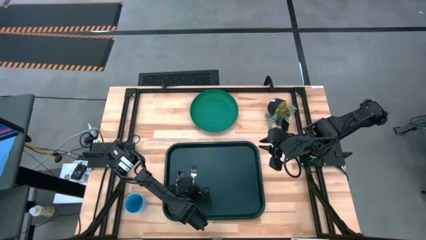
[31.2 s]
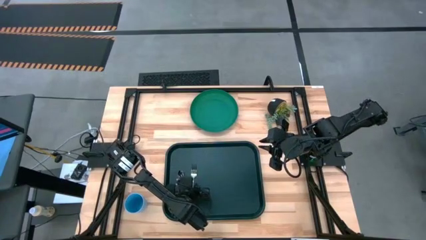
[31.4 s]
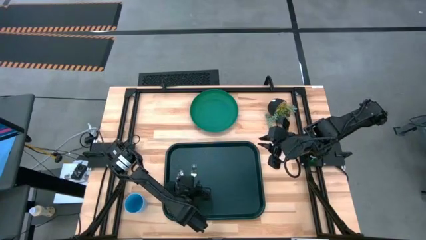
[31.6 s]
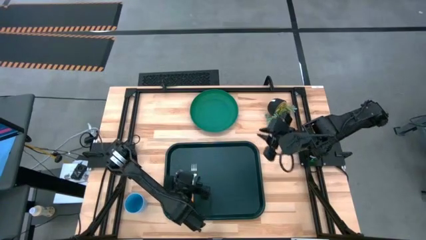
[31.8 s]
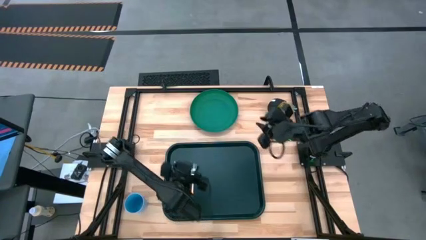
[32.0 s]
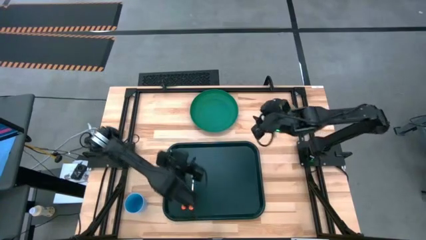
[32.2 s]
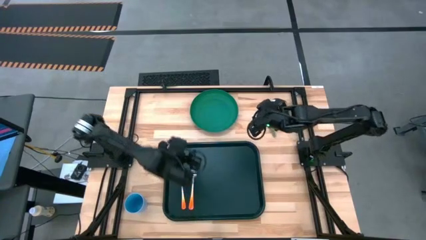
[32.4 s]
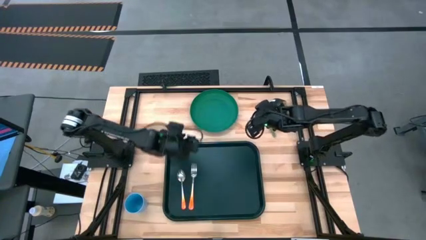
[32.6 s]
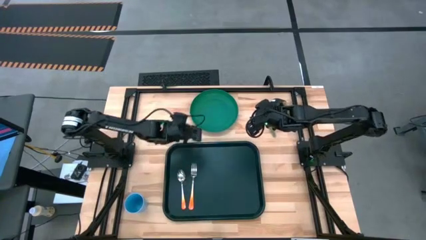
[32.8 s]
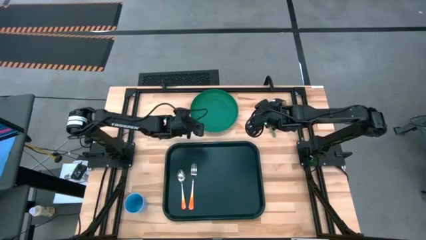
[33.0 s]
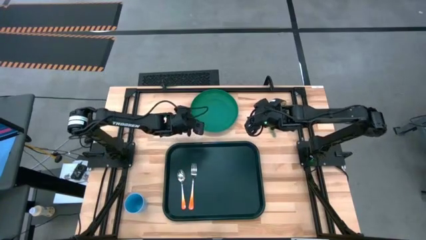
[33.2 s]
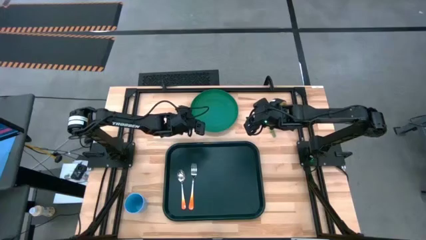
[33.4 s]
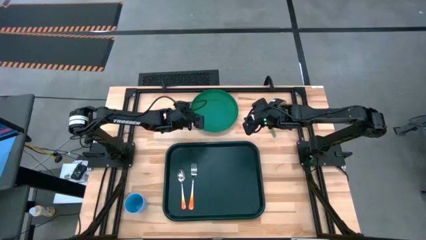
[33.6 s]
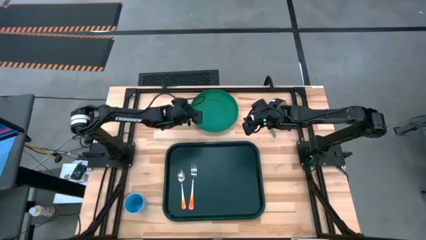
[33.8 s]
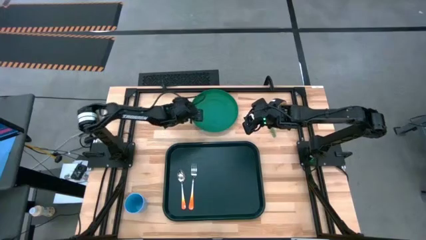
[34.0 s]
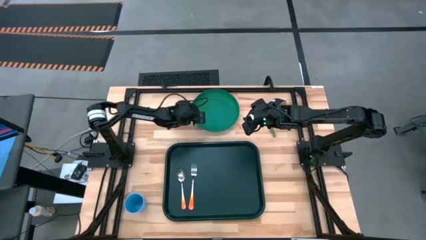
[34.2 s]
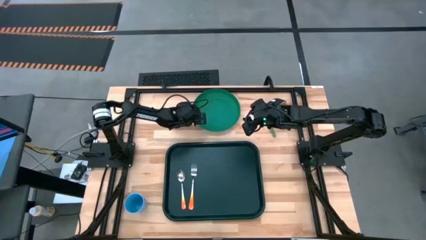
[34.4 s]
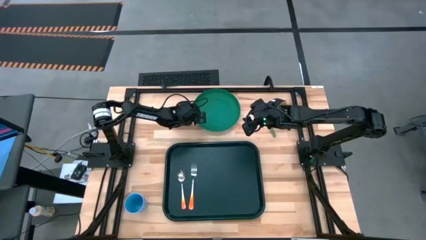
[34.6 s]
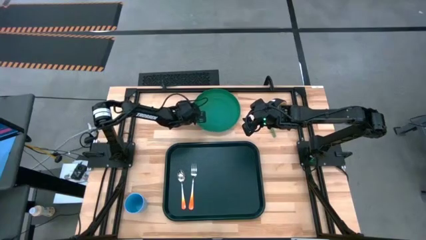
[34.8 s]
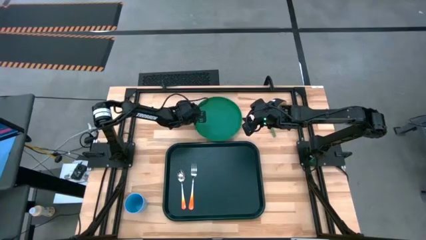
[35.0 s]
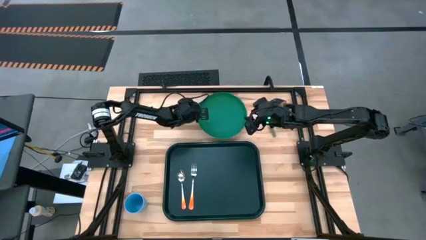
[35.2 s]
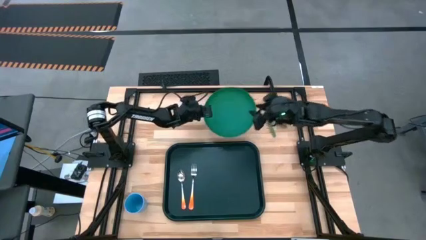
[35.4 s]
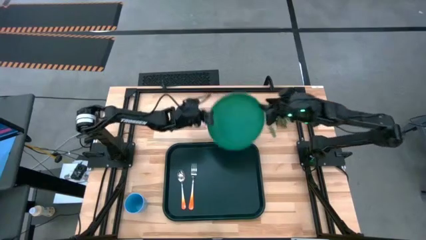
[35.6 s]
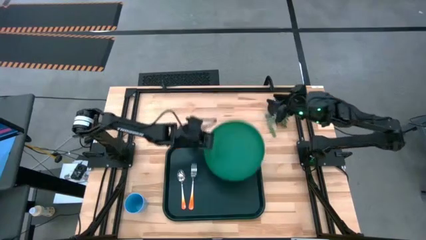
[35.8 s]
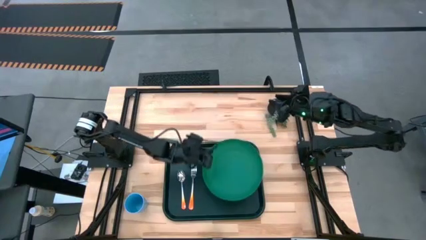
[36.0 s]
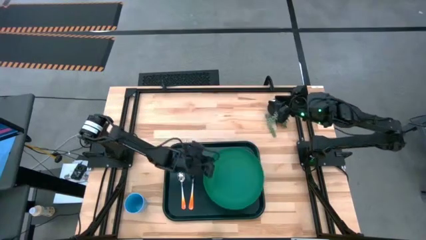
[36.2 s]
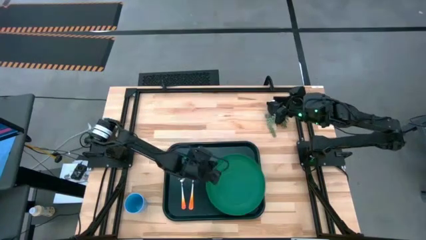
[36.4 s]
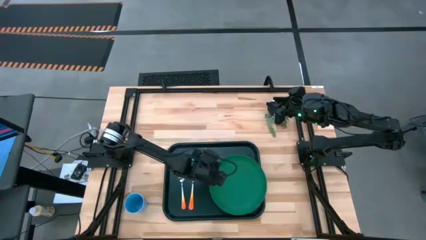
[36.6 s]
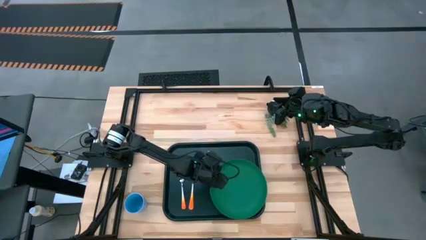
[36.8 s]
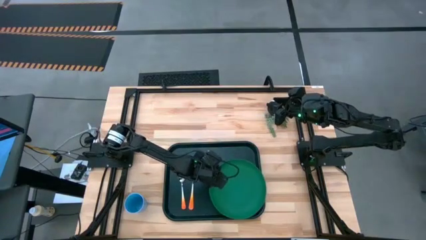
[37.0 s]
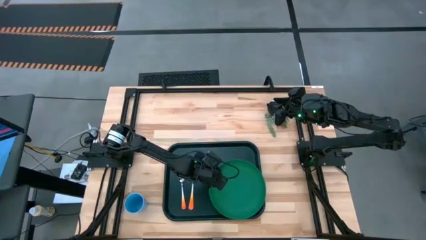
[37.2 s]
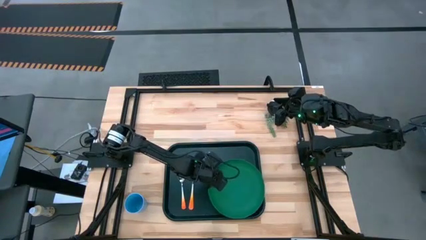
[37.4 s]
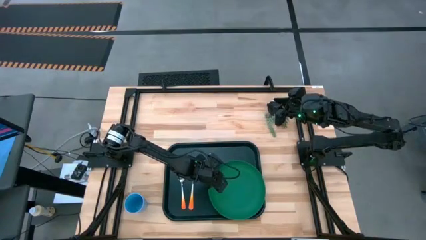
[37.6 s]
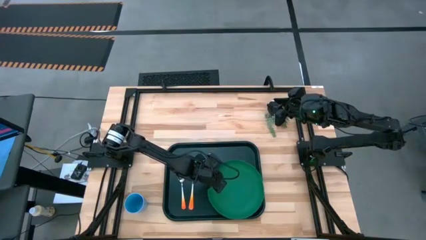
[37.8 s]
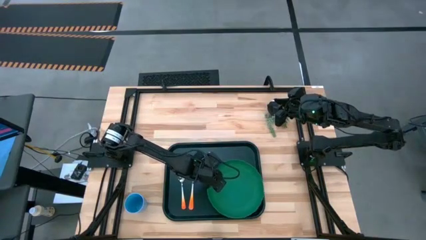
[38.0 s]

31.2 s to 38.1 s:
Task: Pick and place plate/cup/fork/spoon on tray
Put the green plate on the right of the black tray beside the orange fork

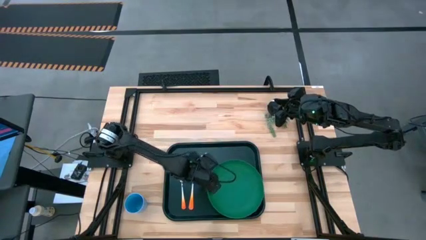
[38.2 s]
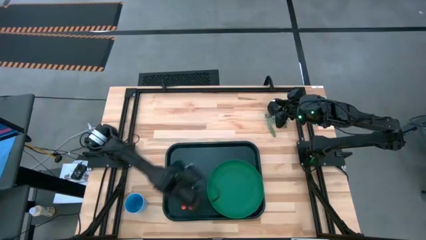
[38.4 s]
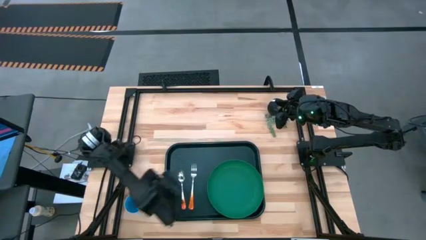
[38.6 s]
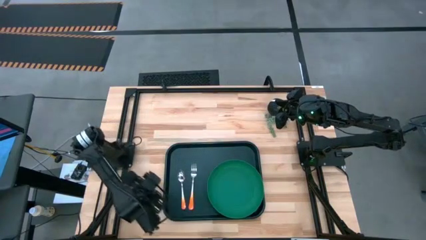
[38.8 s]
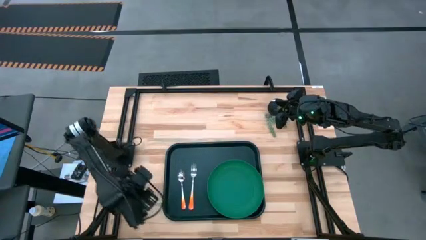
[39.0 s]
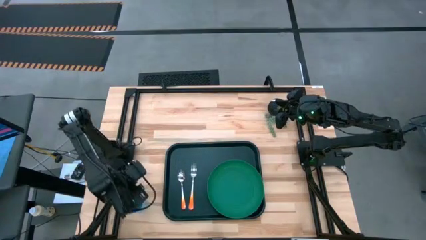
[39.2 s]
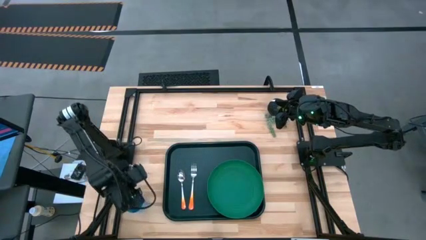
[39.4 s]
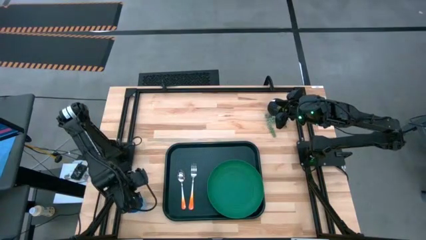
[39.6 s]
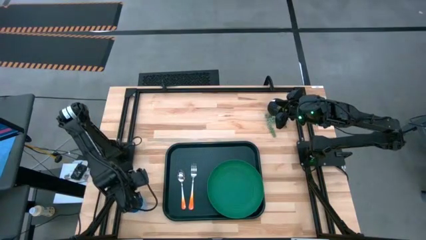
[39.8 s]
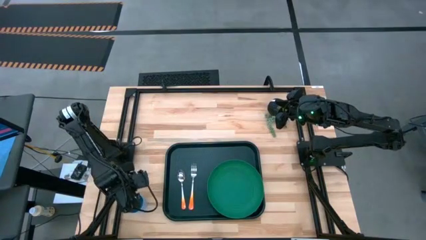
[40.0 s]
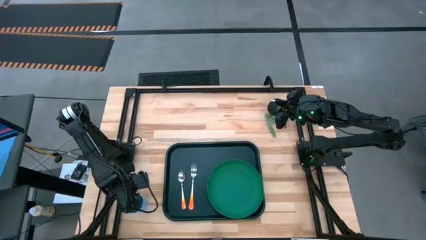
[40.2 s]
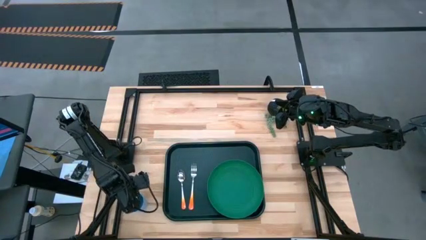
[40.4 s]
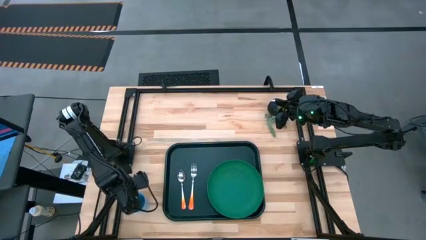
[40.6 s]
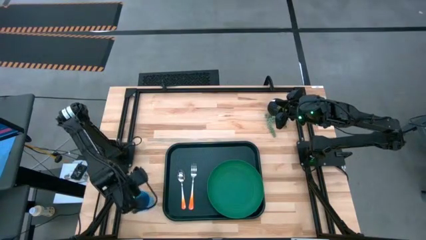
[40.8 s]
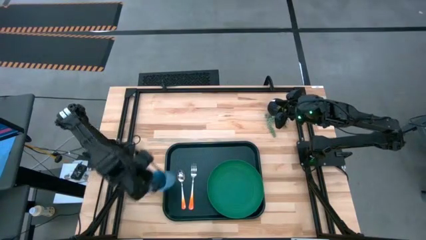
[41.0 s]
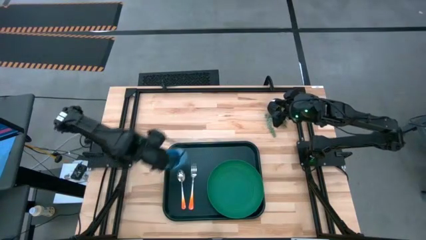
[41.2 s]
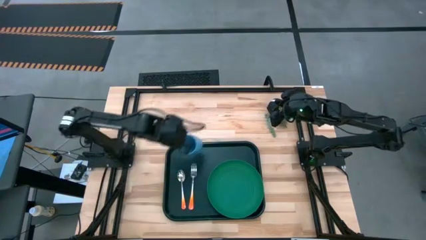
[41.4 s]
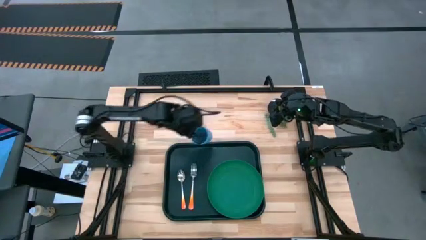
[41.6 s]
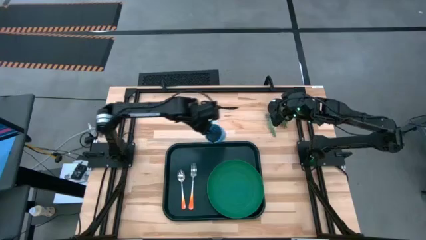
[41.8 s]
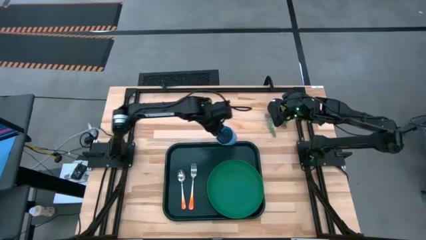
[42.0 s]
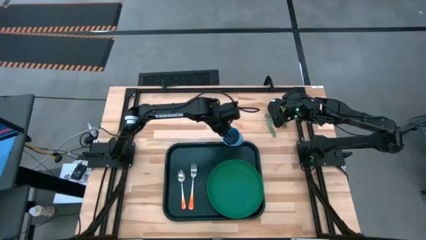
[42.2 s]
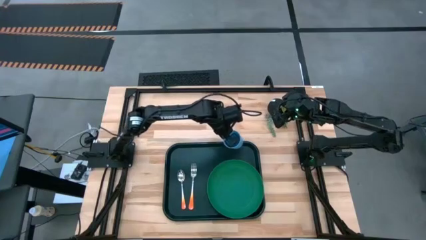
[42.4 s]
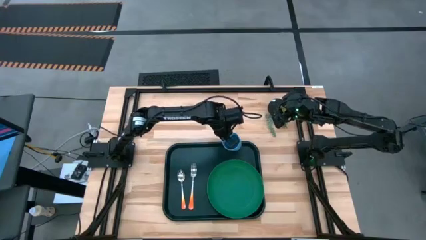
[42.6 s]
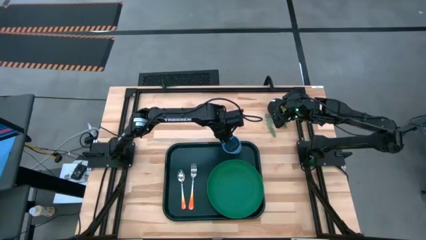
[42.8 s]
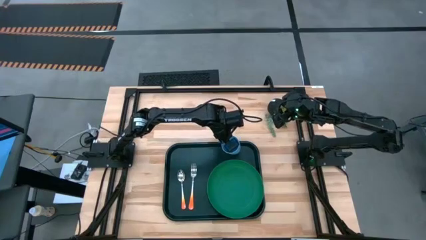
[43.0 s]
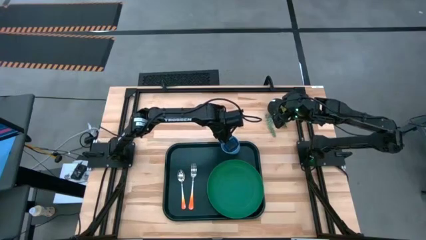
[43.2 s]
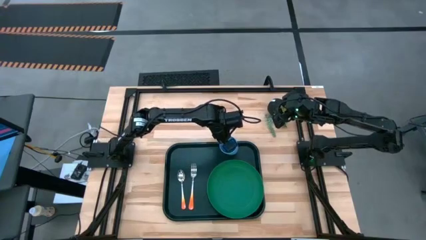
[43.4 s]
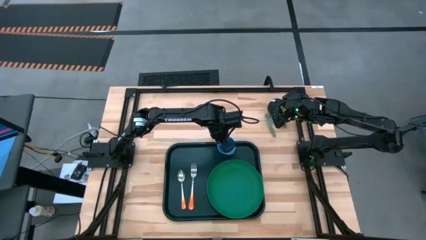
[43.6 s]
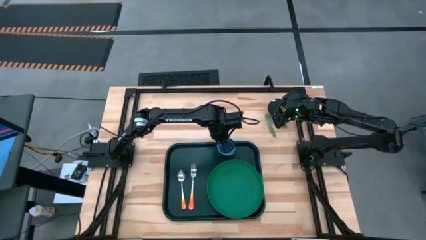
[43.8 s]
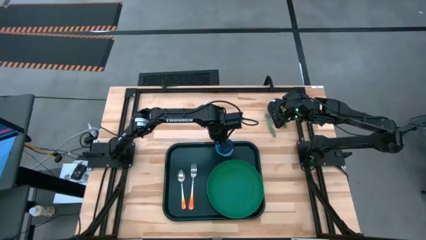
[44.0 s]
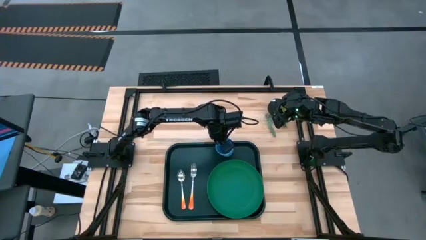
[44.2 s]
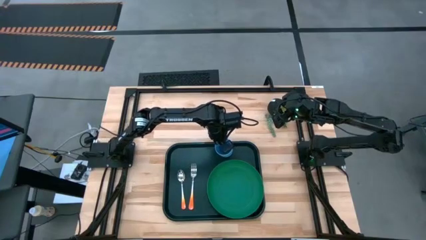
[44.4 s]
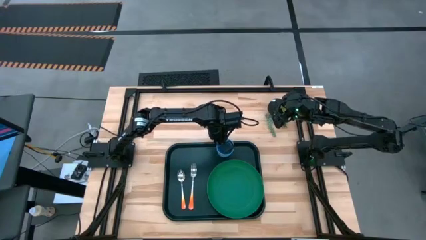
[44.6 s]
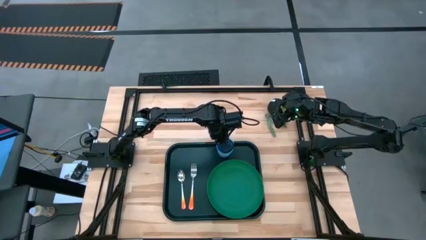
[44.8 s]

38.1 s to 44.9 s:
Put the blue cup on the black tray on top of the green plate

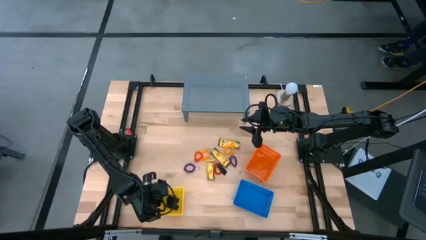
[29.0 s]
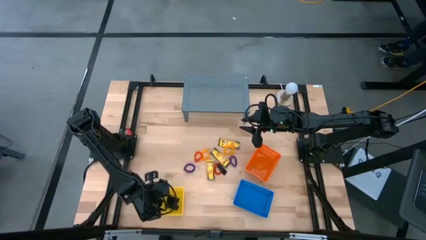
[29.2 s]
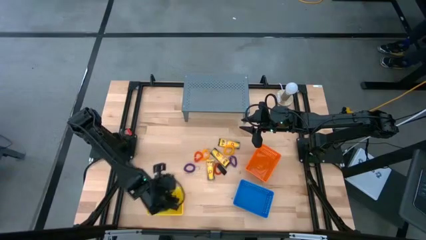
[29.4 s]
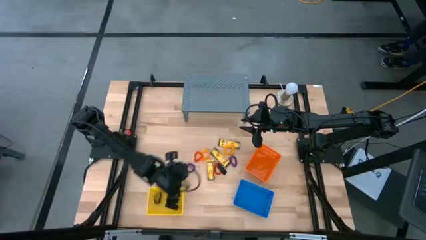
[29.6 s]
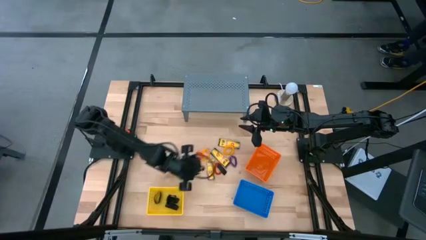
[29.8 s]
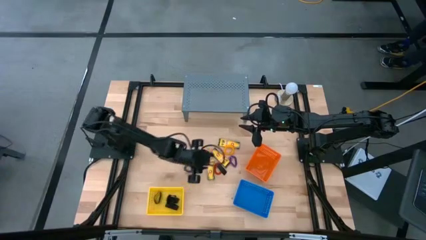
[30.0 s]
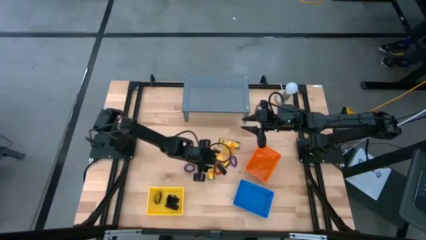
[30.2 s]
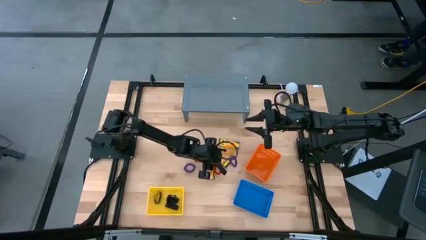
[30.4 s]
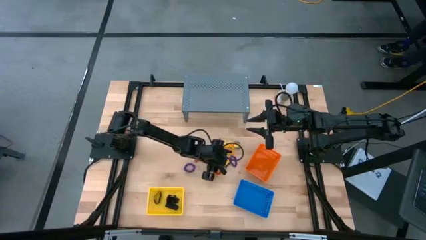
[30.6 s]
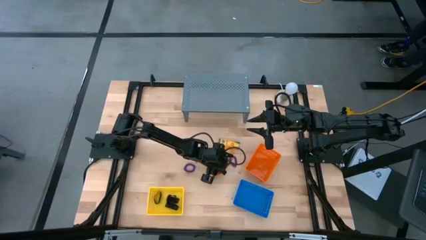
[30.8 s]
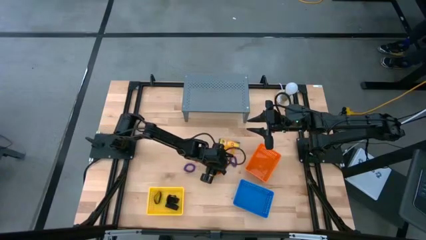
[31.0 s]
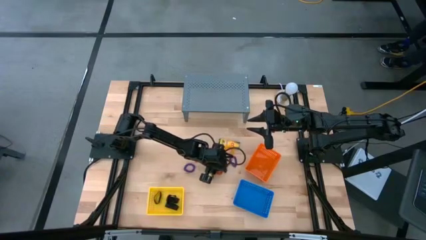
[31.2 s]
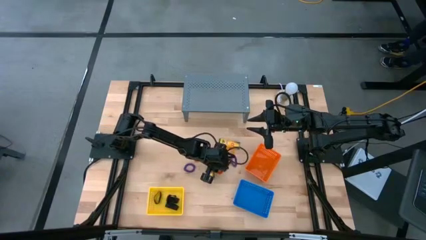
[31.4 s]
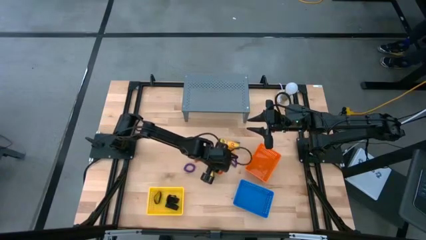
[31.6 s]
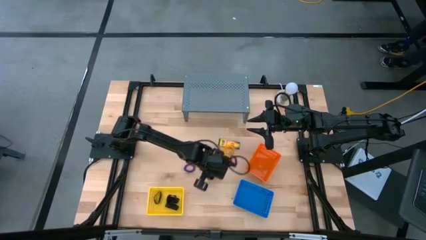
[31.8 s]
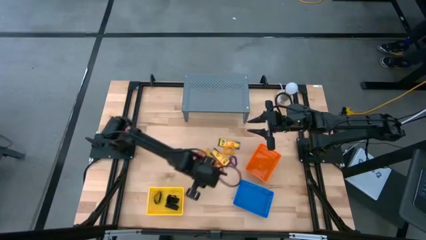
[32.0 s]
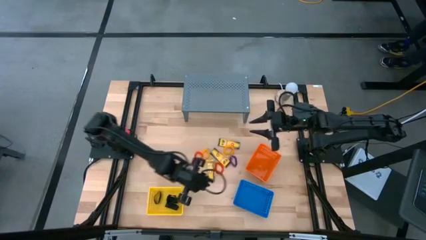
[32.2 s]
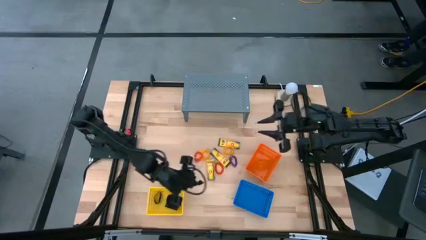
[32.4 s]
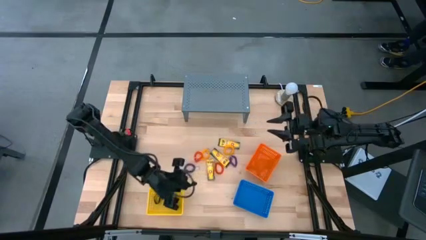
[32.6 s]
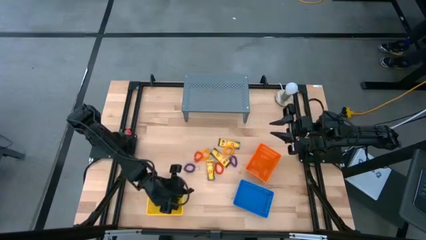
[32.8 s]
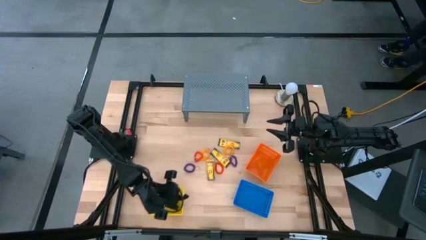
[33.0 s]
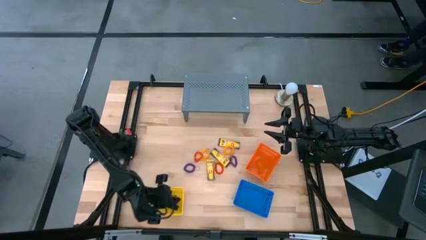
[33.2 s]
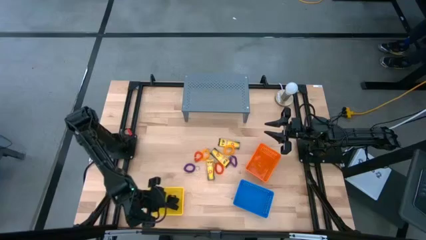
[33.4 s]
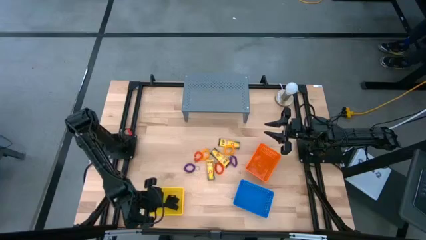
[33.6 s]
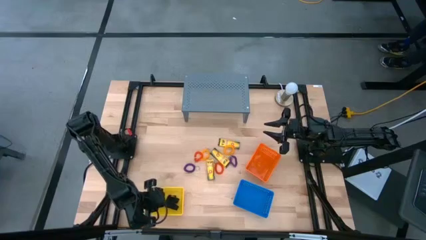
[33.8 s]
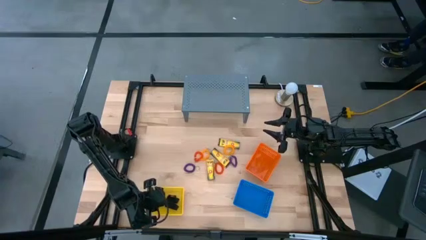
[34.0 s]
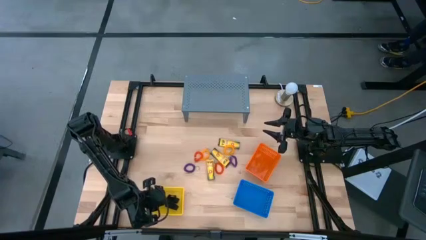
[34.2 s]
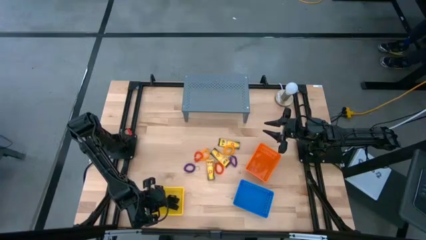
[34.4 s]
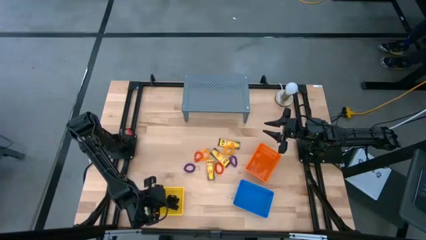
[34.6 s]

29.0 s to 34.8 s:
Task: Pick & Place Office Desk Supplies
Put the black rubber band into the yellow basket
